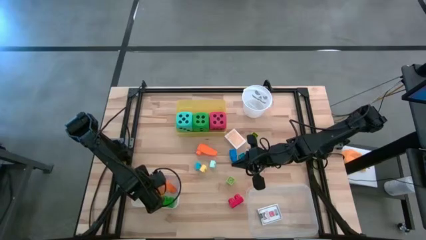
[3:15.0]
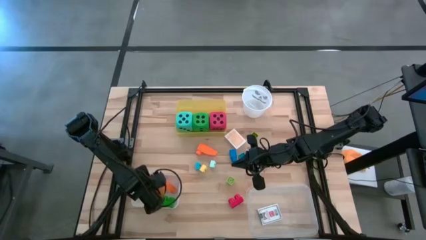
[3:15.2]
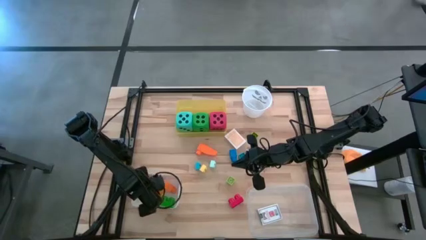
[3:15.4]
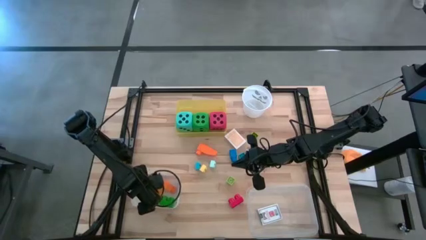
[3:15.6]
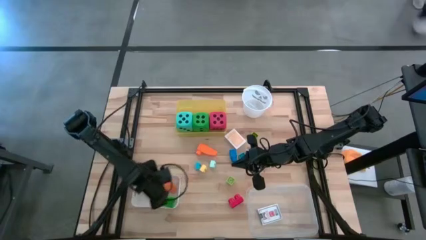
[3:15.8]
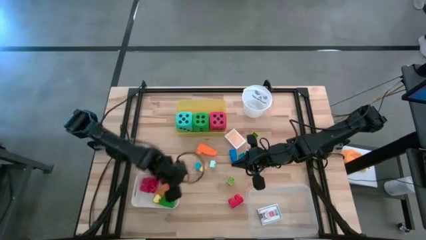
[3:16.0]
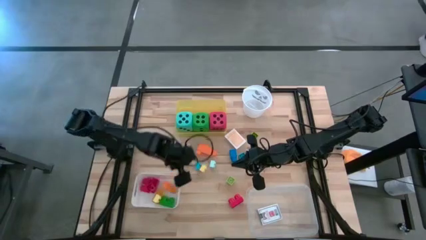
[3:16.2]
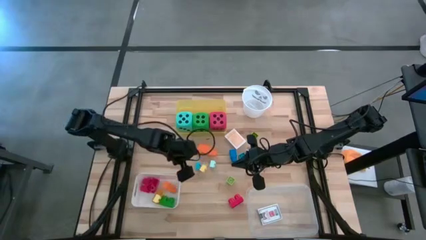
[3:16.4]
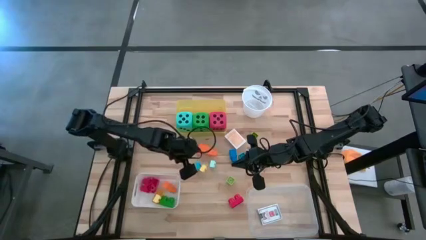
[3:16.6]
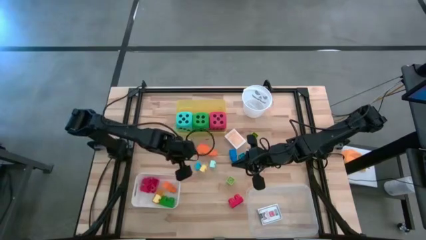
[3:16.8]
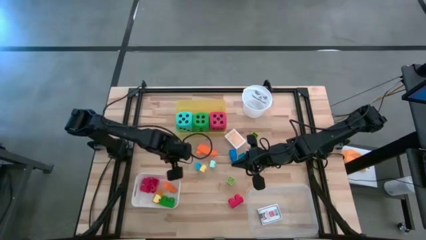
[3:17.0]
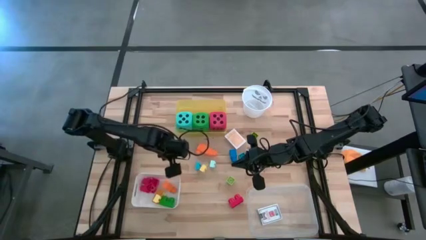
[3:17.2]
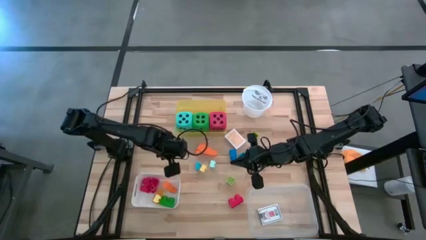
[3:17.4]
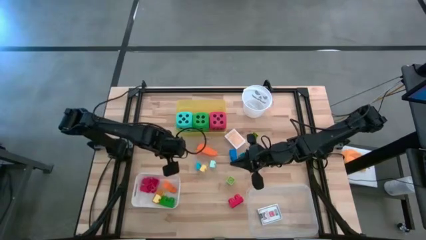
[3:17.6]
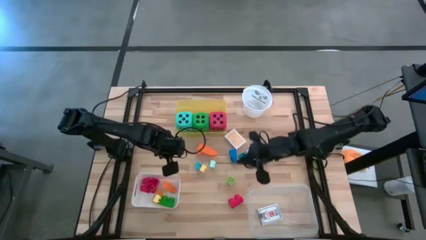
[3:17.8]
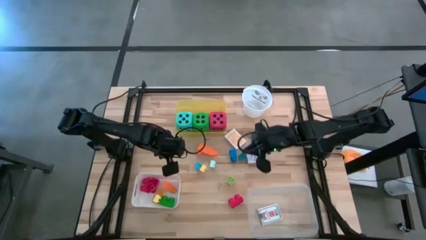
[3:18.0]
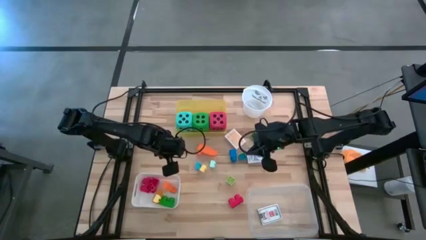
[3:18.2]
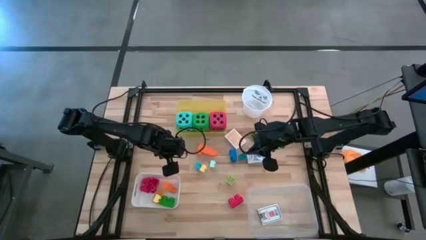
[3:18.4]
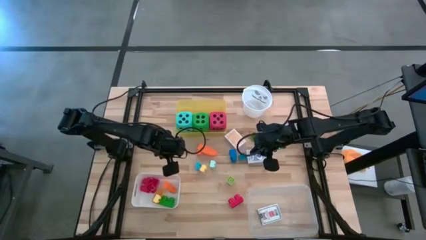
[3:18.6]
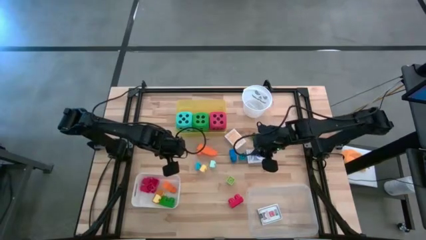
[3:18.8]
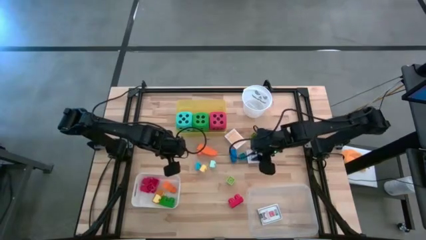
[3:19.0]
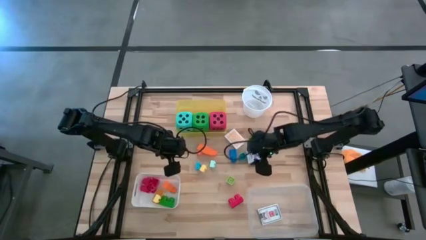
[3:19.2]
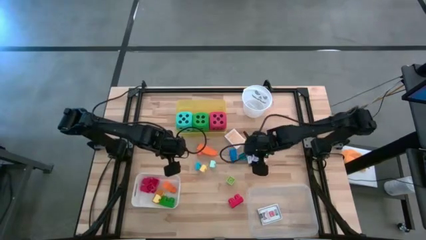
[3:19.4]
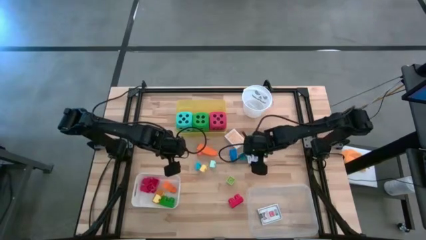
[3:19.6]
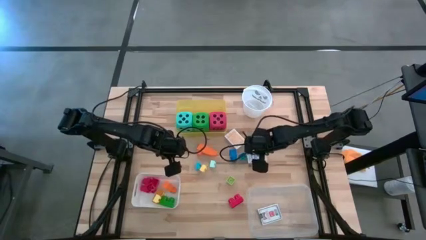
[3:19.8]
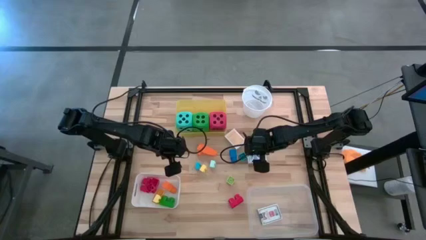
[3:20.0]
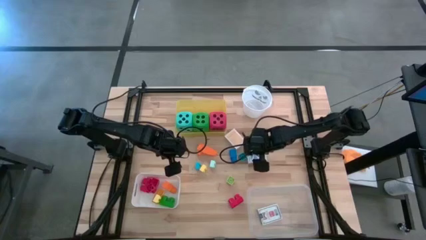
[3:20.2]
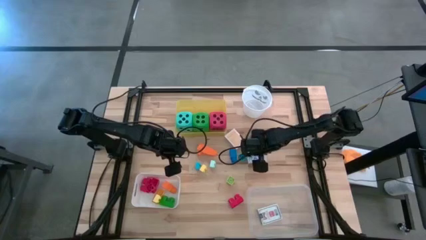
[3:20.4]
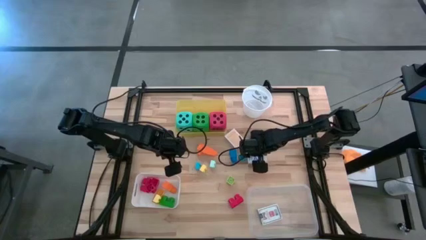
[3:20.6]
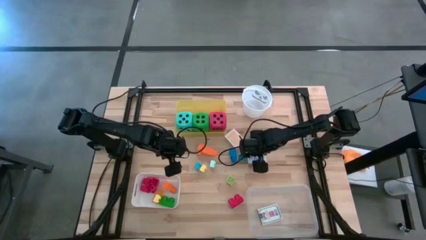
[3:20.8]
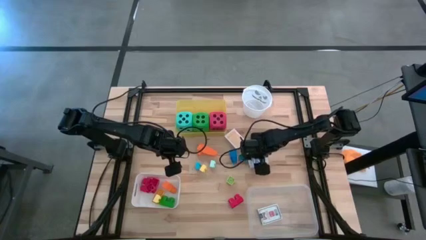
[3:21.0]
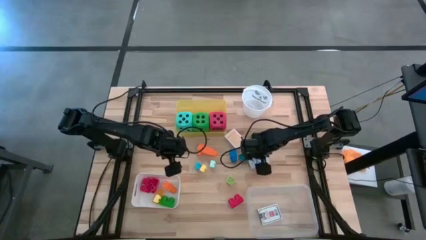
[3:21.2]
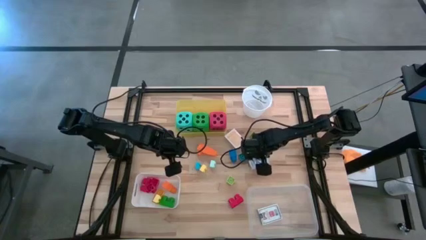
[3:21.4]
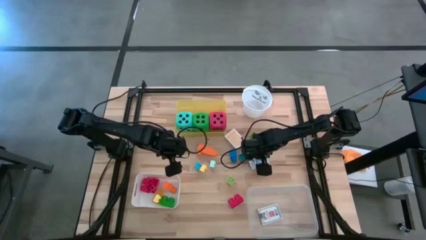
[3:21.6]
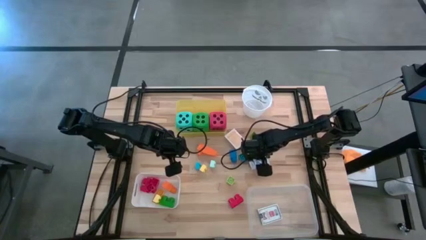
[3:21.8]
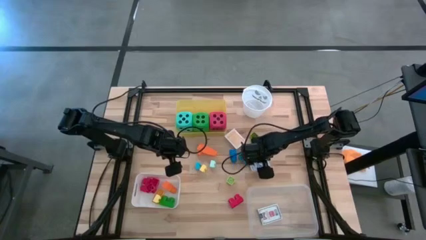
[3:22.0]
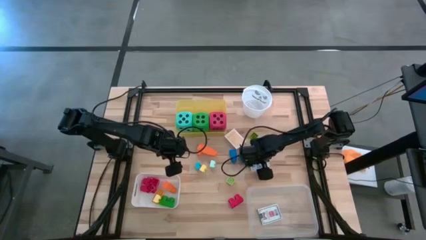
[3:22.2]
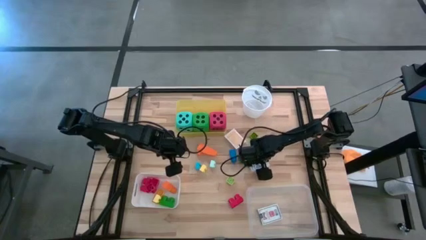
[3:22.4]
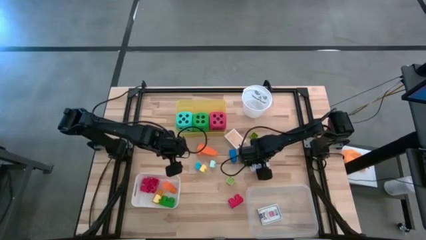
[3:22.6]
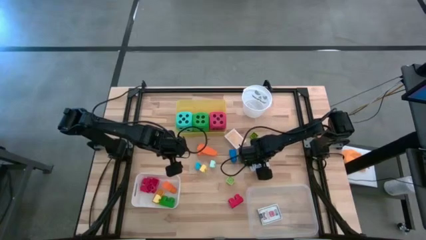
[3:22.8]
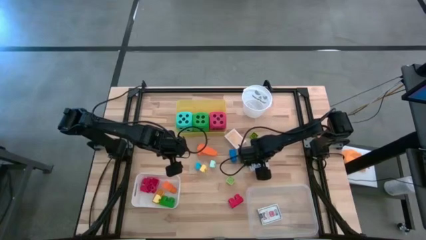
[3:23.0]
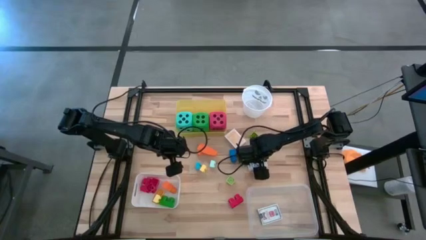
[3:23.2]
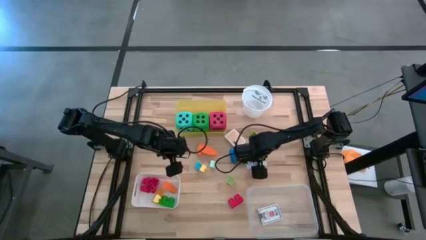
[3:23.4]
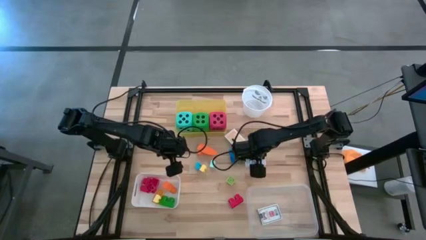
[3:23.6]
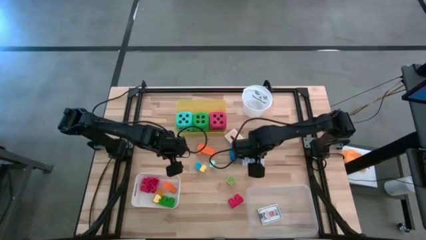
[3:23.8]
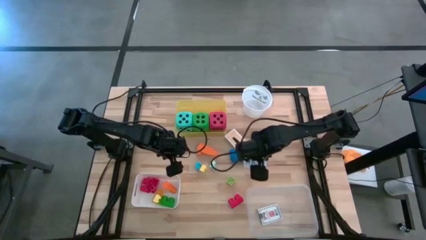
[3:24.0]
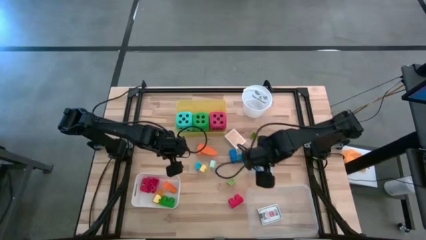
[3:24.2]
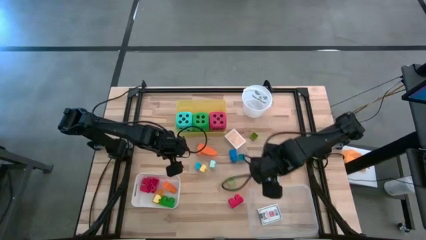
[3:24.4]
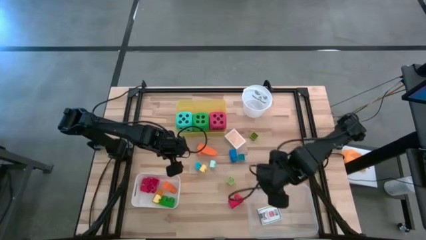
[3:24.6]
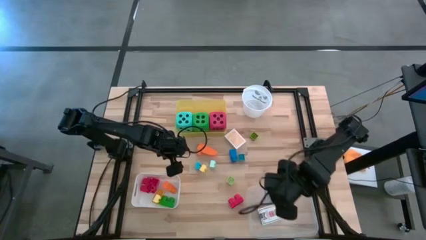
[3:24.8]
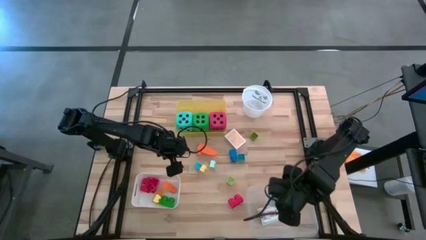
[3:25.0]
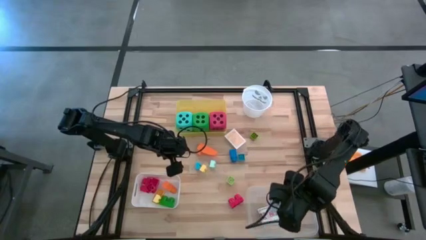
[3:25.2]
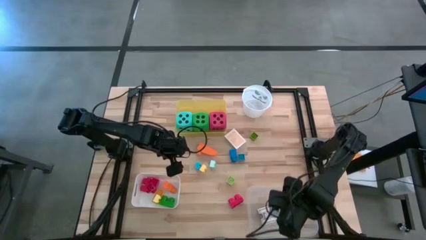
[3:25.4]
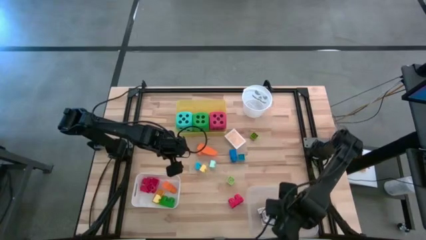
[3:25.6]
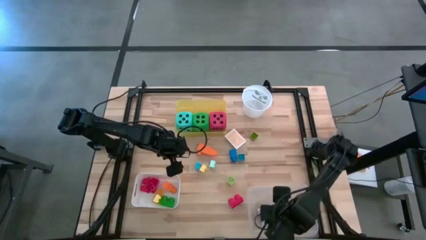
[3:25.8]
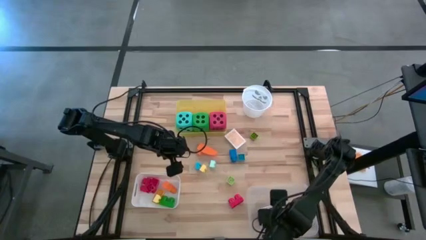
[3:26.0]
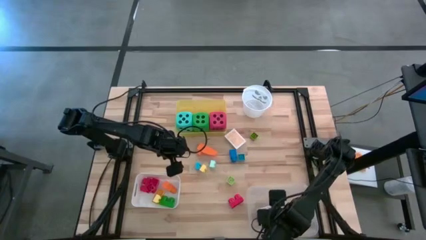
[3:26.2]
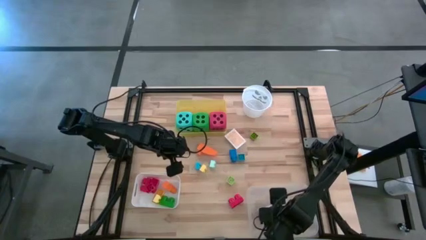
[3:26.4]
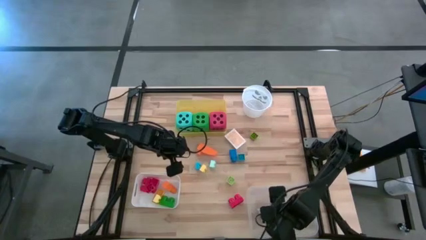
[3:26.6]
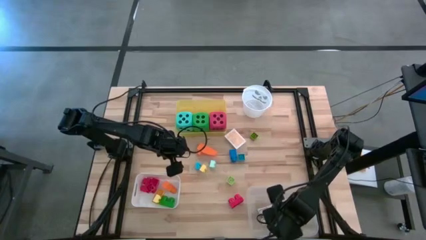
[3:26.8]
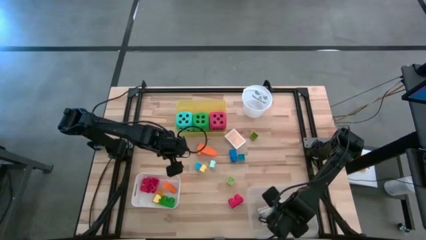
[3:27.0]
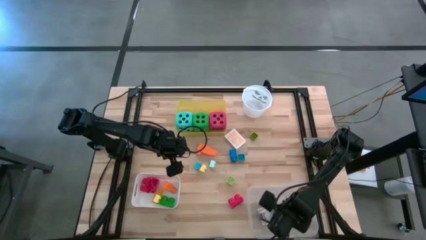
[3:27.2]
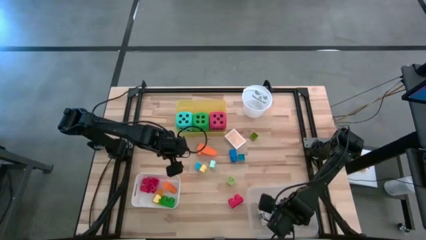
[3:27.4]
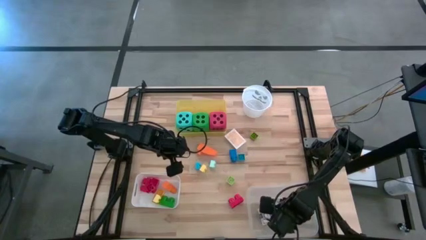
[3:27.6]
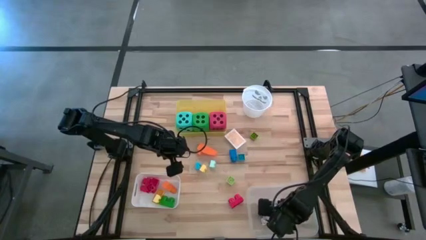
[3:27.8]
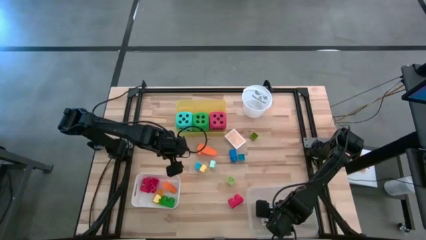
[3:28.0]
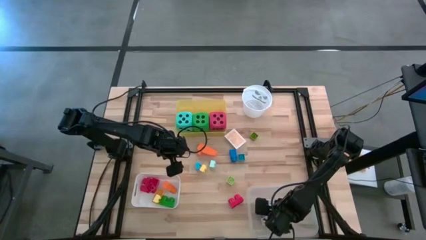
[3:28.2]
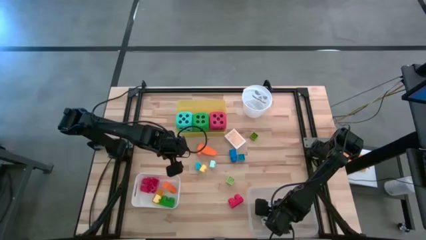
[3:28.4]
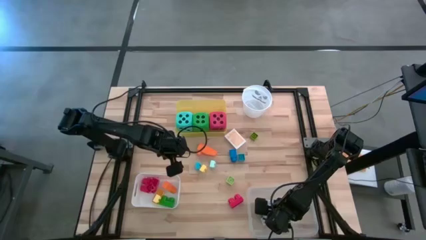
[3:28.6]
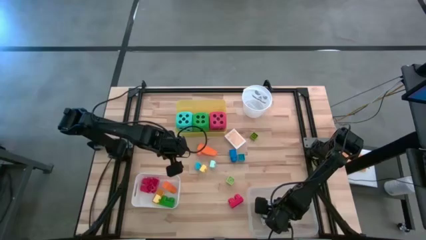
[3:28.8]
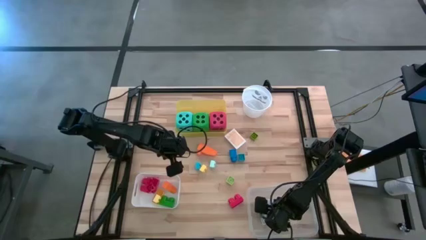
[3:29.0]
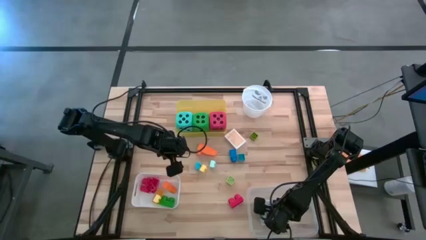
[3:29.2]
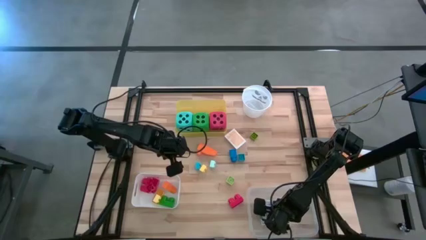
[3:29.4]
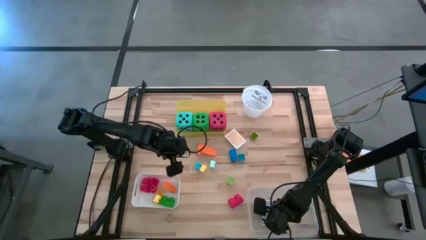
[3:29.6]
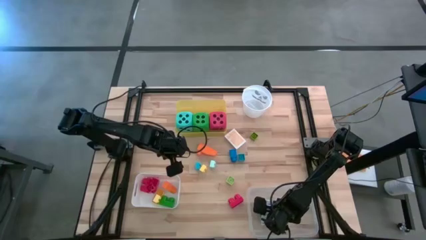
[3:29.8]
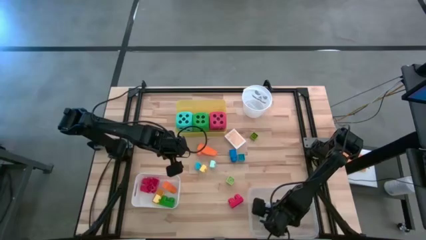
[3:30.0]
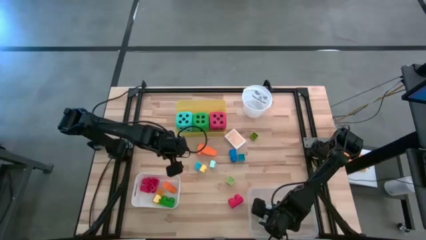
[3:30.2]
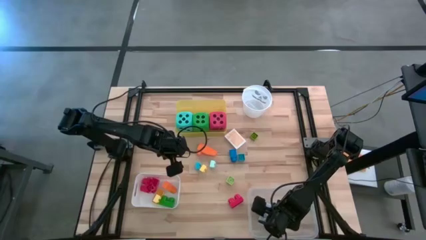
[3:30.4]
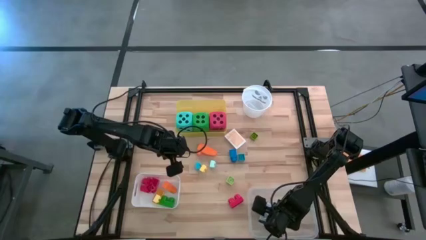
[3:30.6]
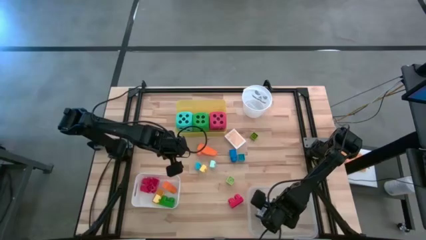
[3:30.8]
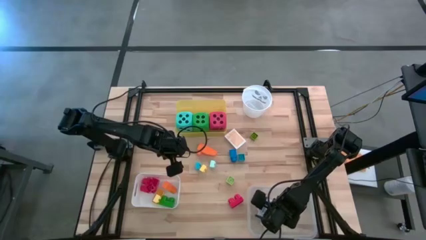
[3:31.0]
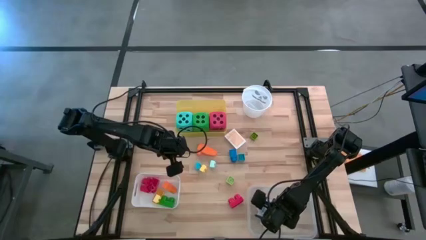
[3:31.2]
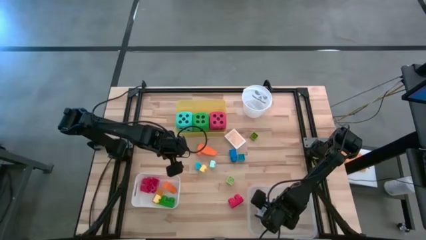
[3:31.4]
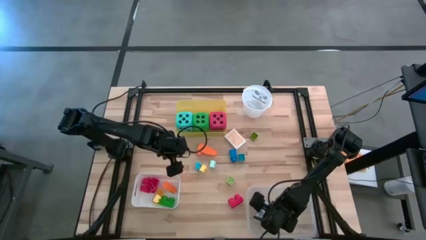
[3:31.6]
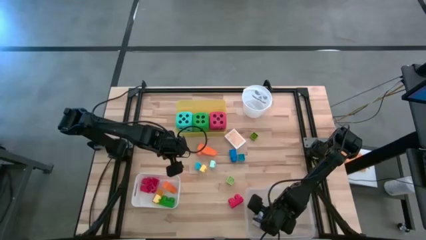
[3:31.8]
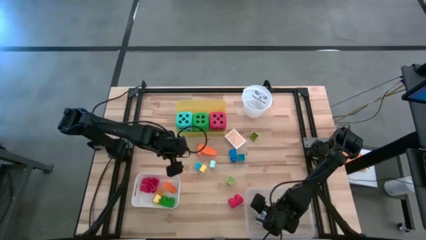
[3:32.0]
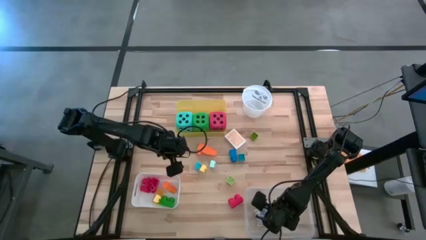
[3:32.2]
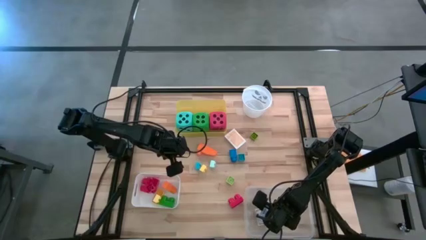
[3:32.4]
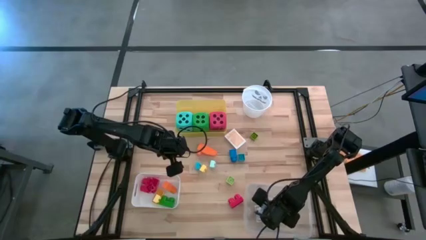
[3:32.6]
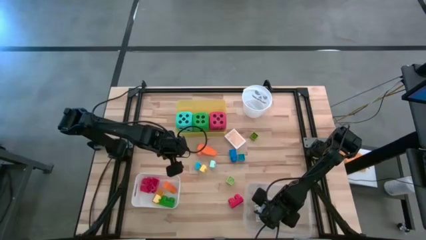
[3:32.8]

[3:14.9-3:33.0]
Task: Pick & Place Toys
Put the blue deck of cards into the transparent bin
